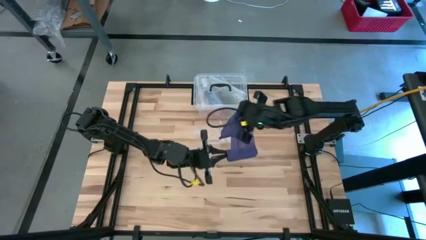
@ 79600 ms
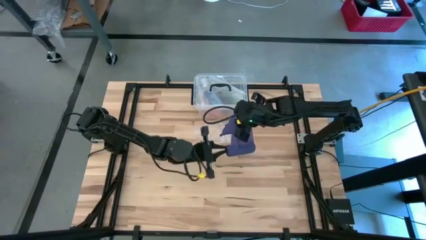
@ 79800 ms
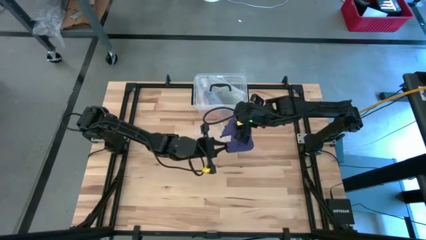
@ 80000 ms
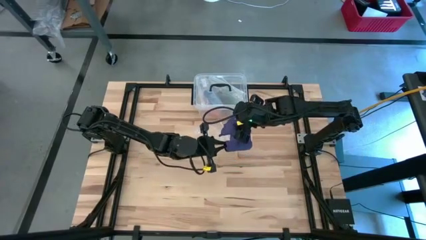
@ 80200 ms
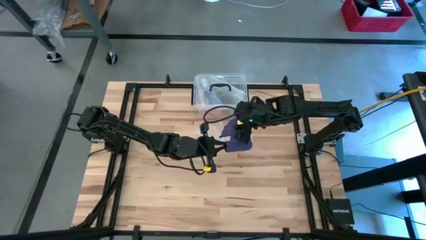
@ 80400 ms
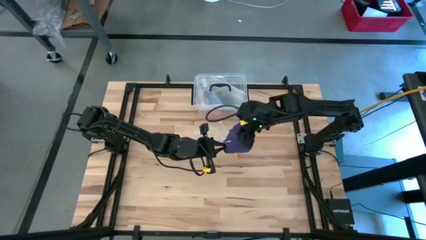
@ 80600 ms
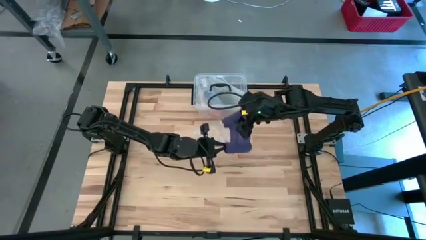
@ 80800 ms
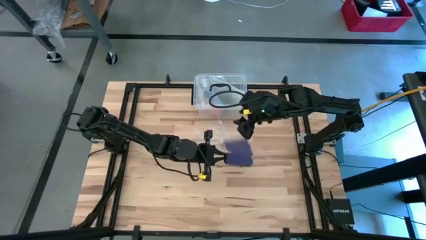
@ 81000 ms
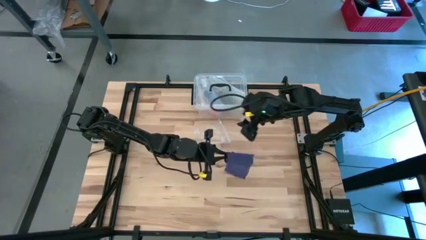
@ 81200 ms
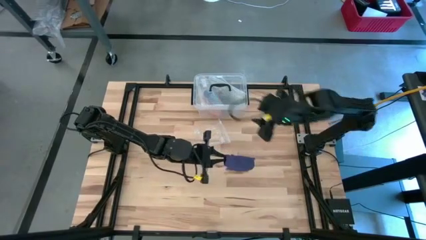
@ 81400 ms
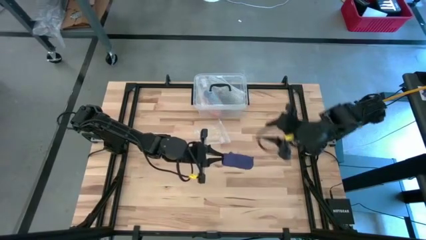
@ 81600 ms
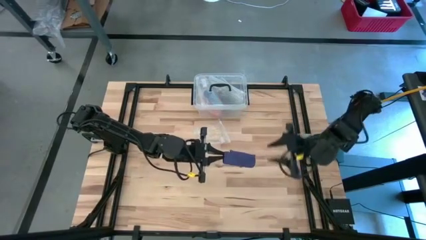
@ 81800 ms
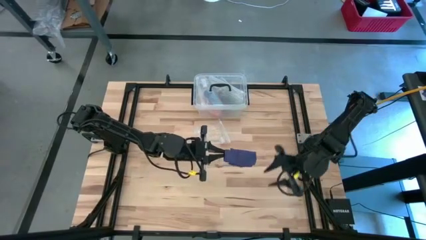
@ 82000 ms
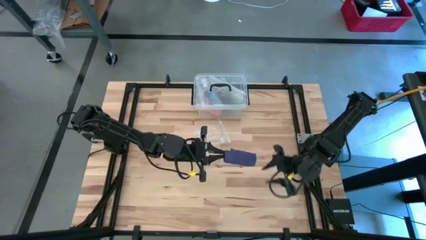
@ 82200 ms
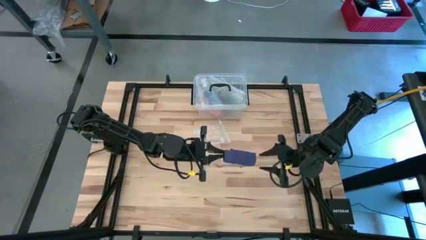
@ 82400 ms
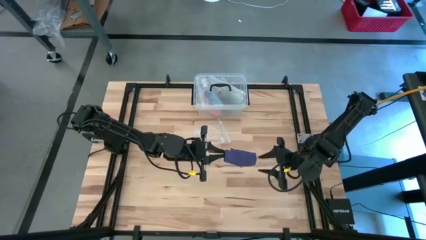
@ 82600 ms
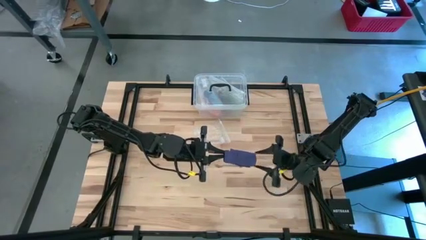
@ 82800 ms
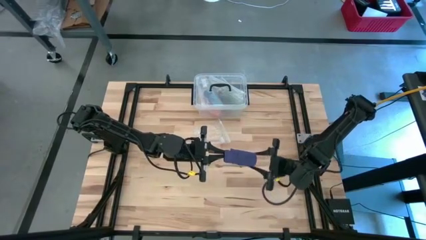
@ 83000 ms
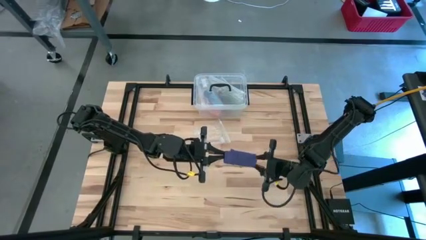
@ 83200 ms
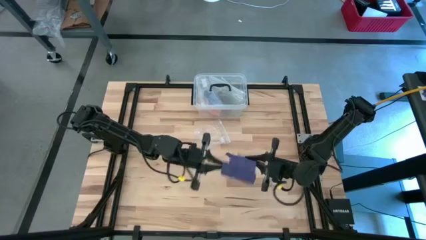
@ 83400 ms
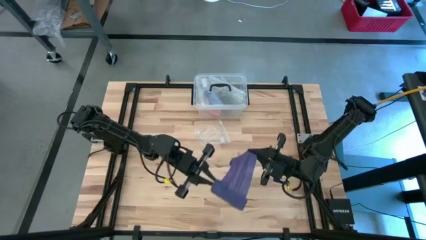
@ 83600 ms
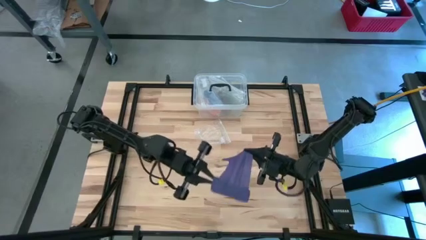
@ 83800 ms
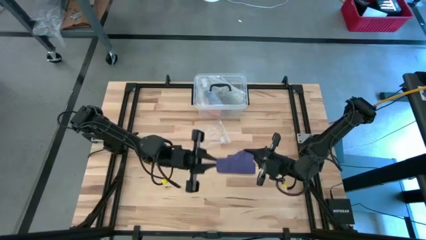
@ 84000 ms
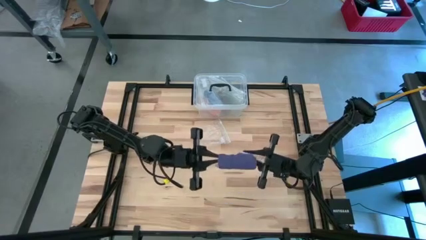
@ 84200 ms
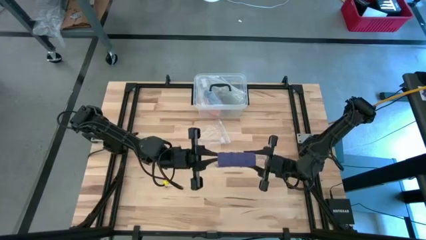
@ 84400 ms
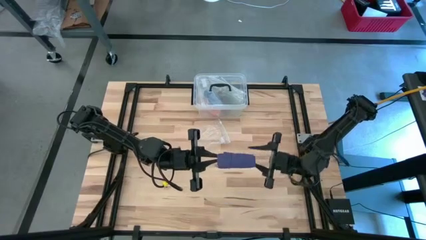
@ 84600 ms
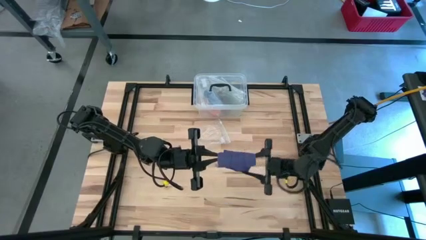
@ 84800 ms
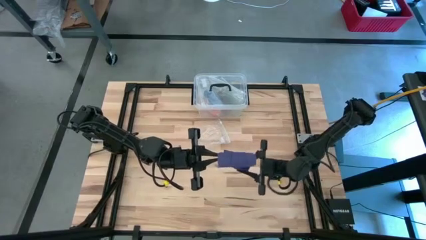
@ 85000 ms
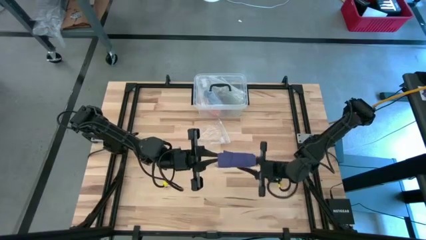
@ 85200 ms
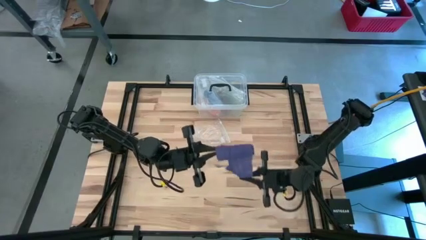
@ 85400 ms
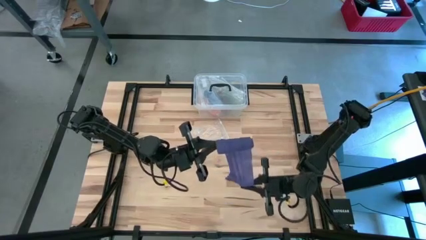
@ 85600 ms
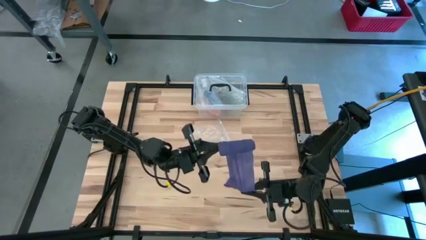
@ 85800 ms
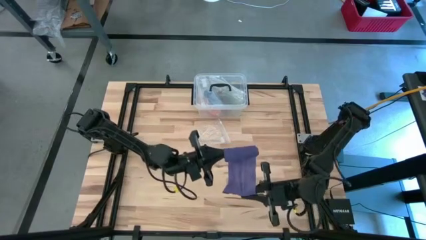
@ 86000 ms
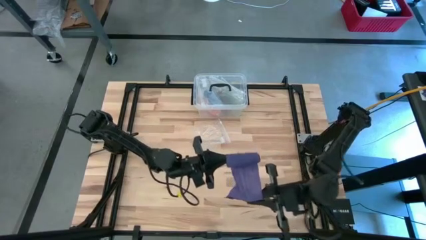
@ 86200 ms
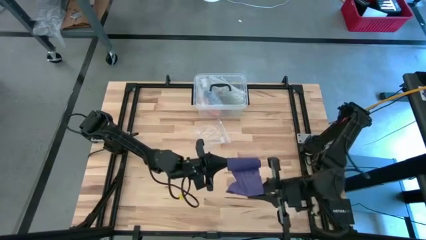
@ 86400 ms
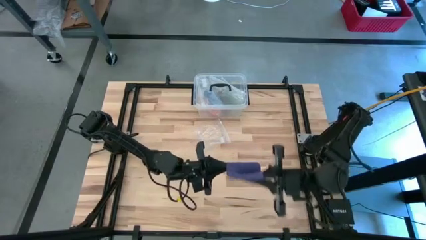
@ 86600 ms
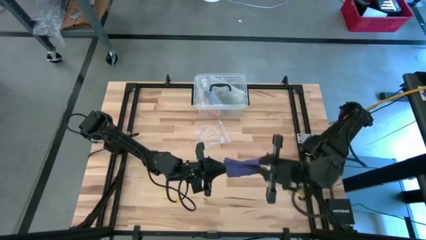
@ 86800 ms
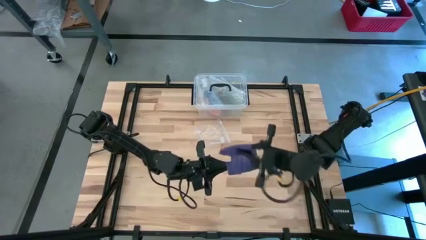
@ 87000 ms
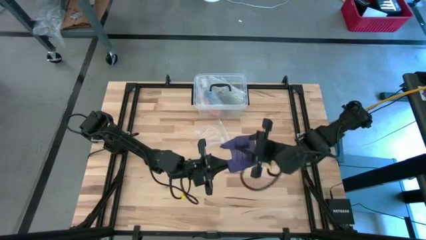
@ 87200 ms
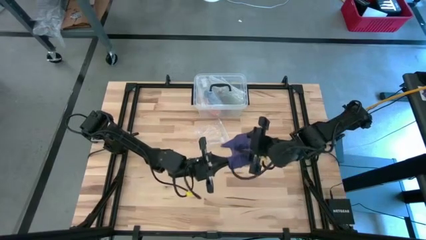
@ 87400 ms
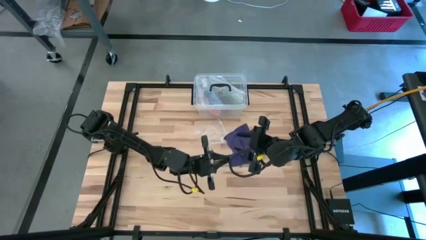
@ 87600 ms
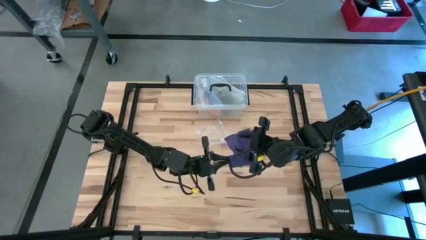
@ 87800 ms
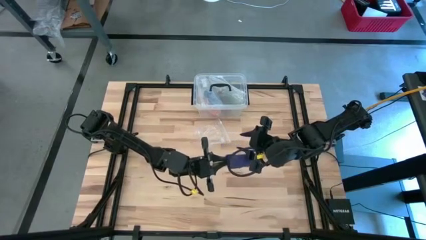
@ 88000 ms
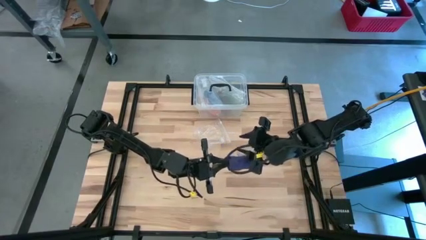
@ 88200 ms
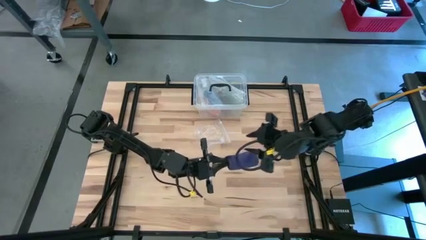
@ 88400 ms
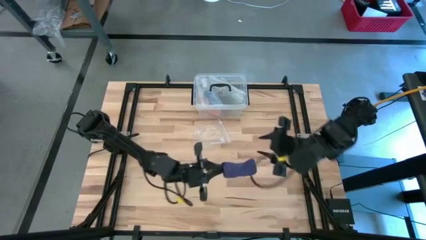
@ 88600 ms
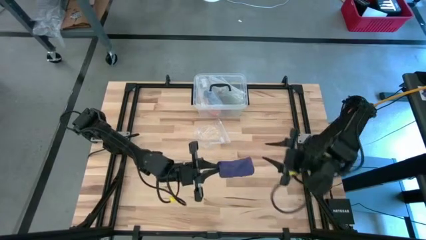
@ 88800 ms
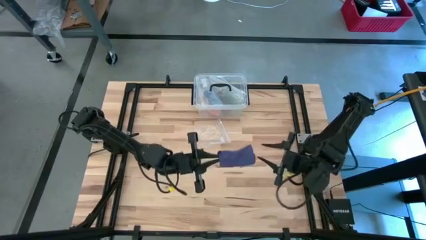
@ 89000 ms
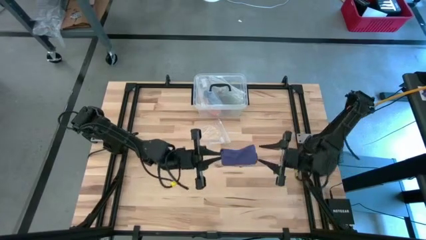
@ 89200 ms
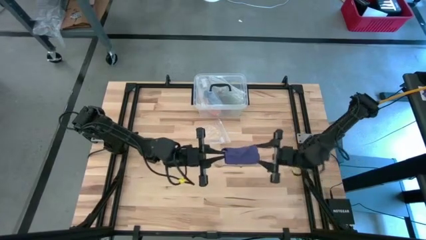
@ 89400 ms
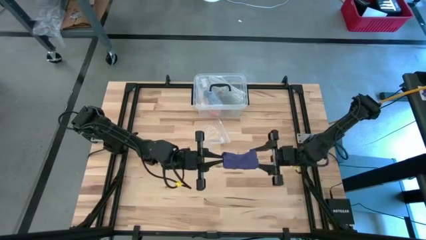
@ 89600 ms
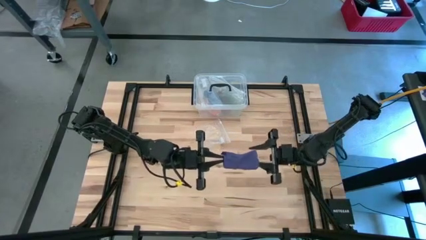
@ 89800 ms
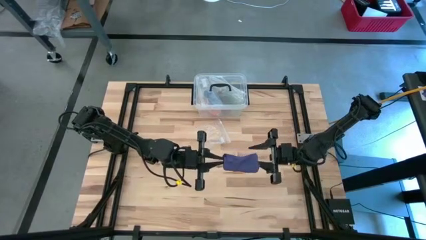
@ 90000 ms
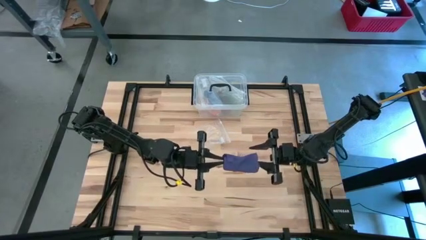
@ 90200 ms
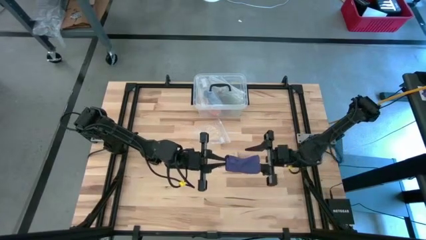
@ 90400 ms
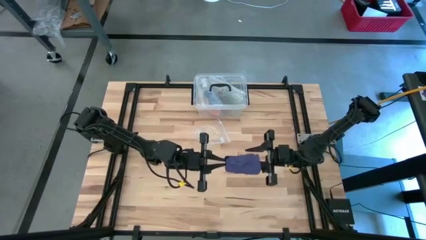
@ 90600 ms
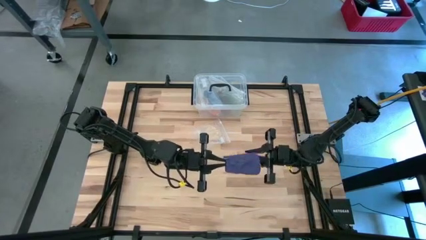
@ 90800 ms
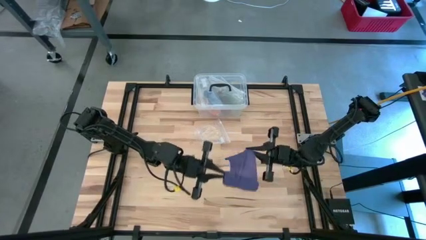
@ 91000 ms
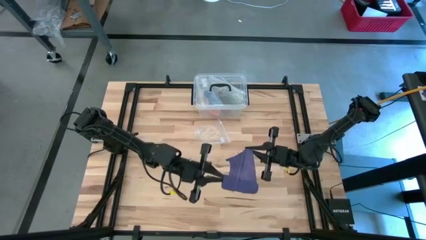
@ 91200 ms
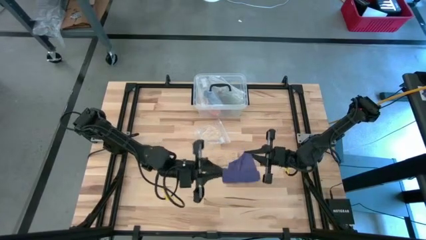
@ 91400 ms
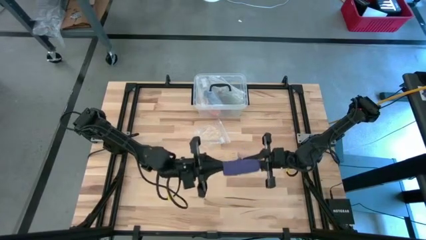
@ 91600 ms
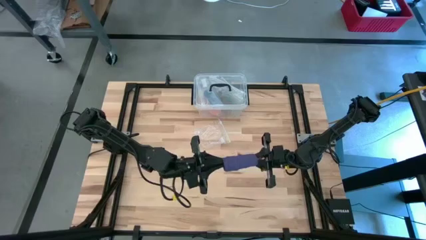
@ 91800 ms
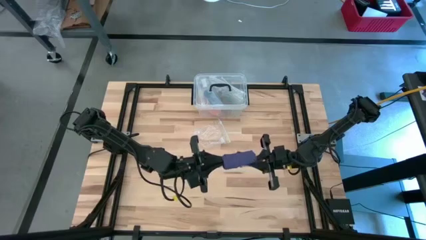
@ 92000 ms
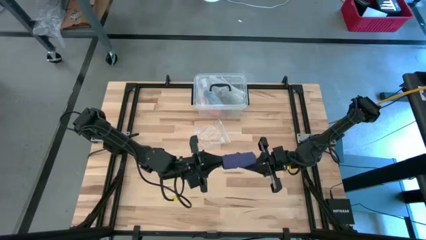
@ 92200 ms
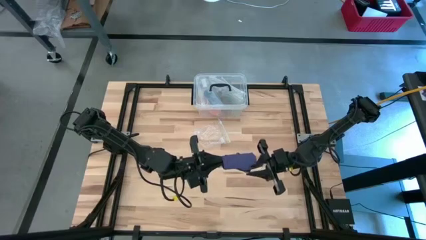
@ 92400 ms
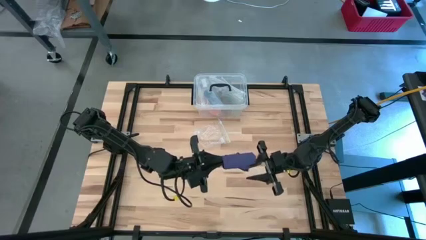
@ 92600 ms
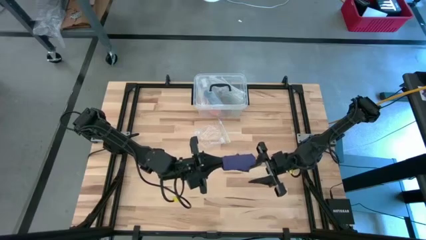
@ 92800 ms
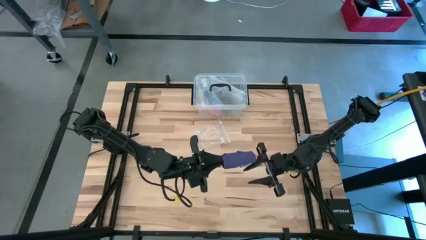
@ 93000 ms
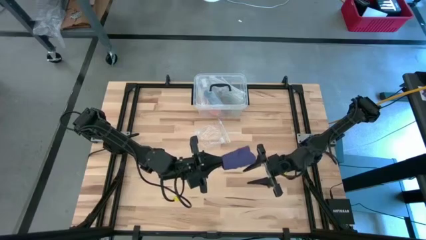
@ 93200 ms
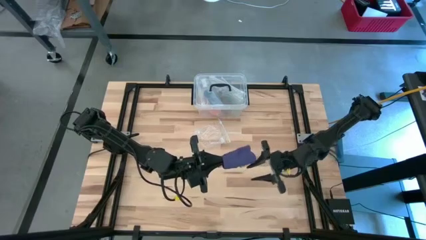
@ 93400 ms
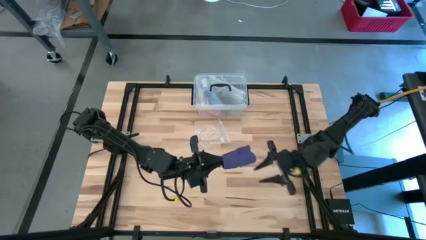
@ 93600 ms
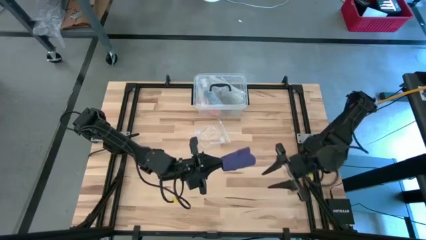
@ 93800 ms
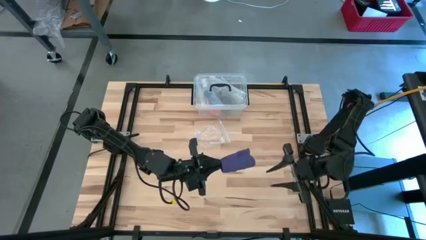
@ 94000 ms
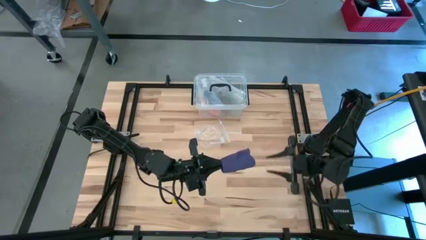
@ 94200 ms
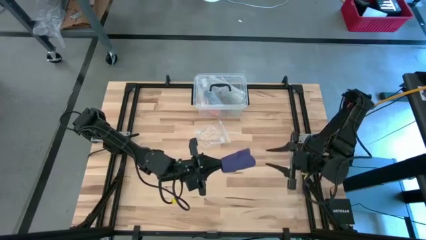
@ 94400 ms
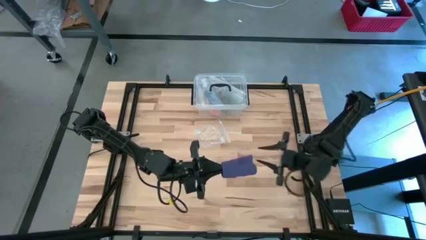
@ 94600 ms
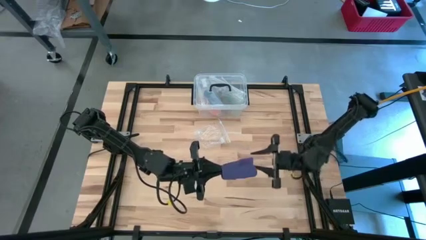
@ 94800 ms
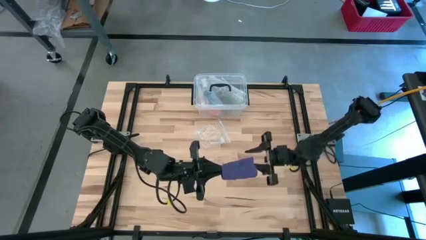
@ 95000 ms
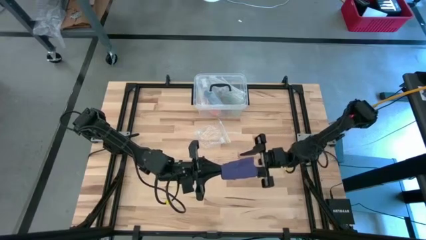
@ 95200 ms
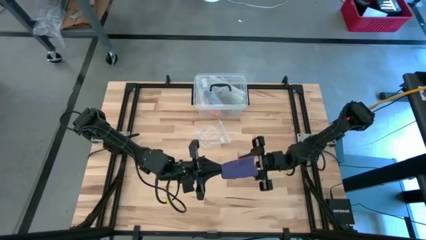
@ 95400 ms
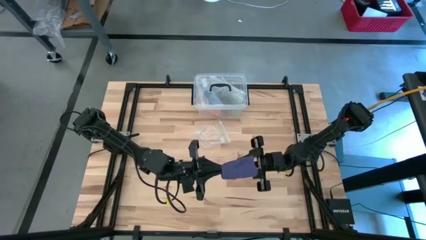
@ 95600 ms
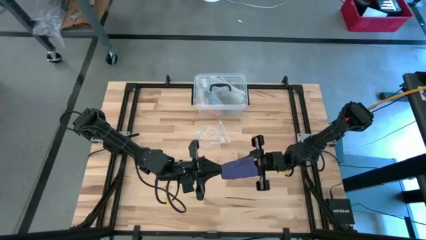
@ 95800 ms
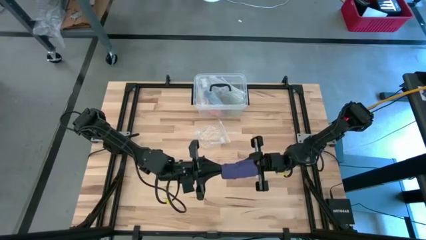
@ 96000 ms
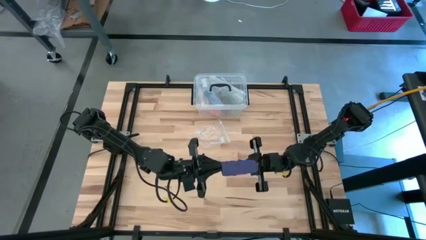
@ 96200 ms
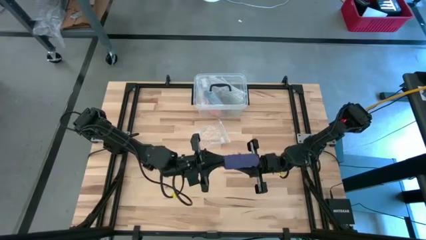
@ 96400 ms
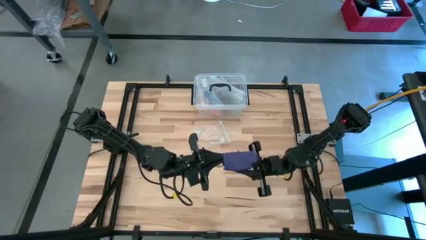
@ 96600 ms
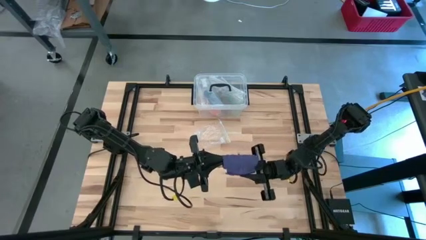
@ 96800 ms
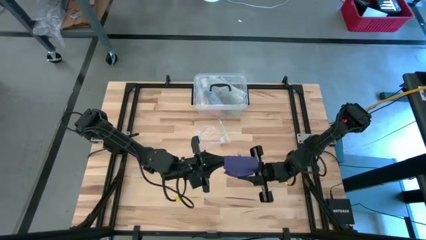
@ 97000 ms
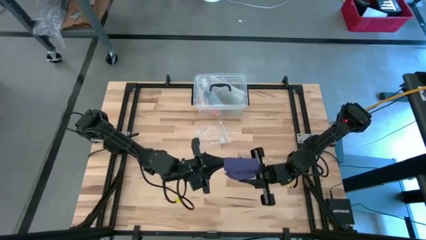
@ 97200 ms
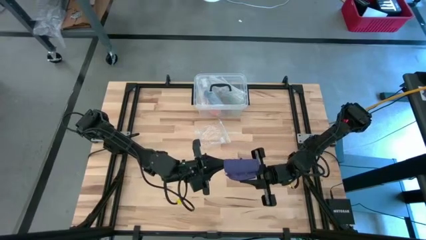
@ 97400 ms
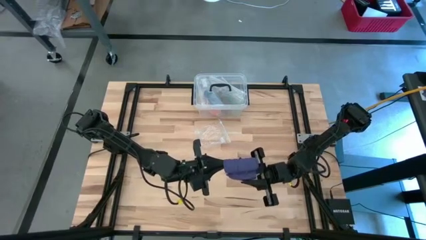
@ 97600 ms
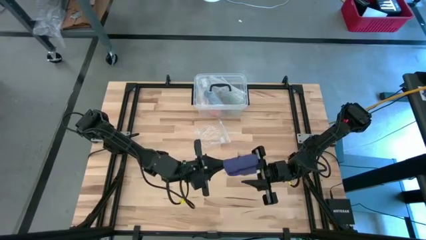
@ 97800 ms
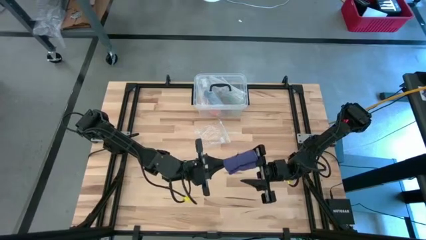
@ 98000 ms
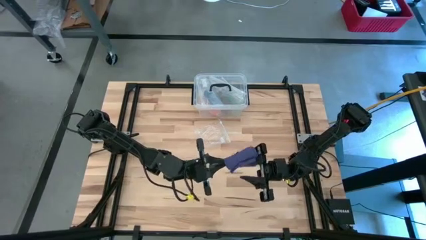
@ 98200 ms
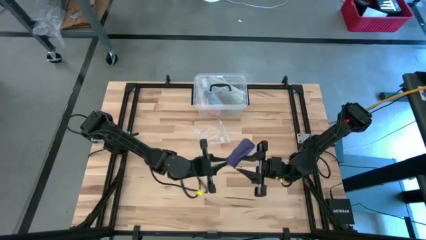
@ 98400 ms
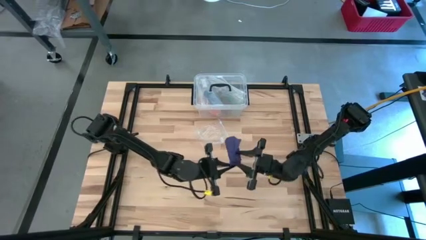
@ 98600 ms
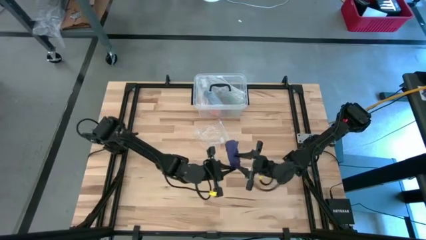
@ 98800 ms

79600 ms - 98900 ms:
Task: Roll bandage
Roll the blue bandage
